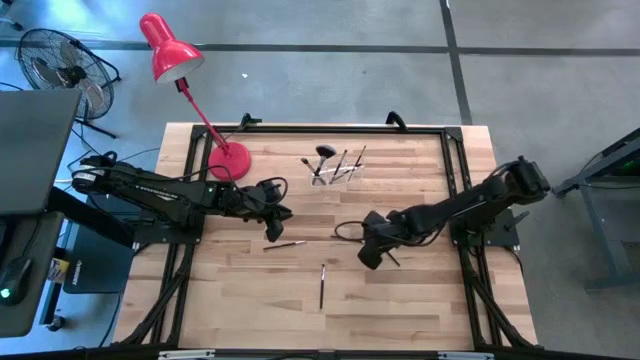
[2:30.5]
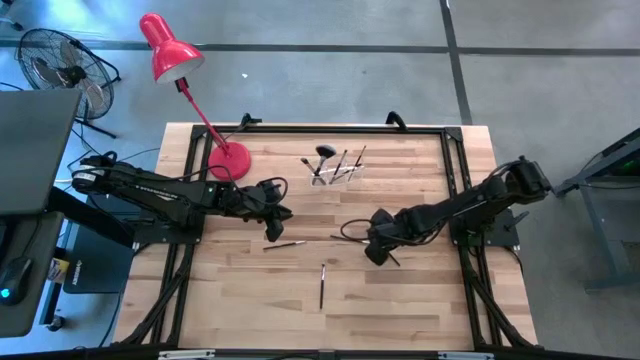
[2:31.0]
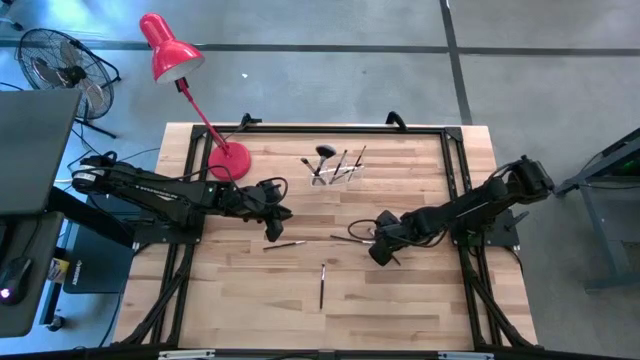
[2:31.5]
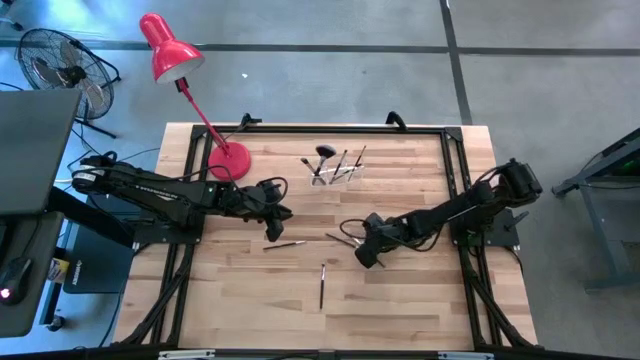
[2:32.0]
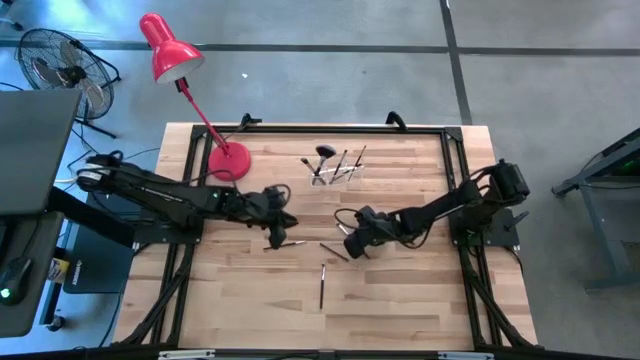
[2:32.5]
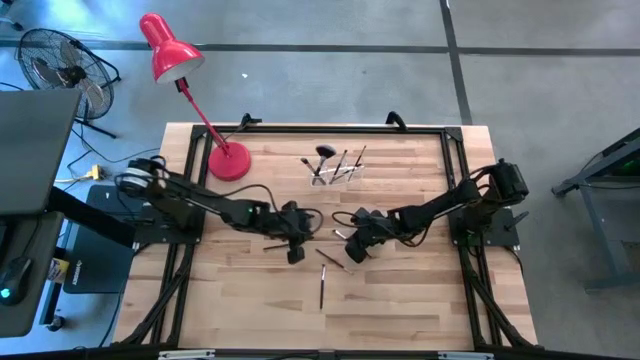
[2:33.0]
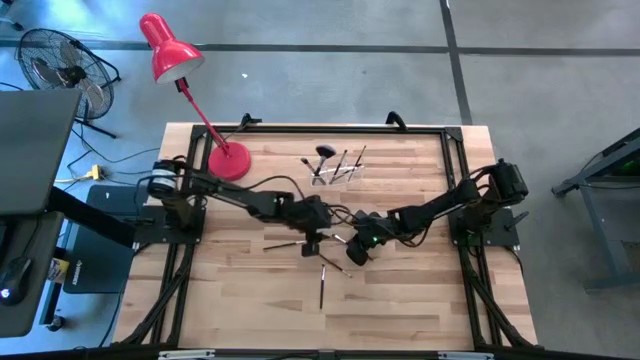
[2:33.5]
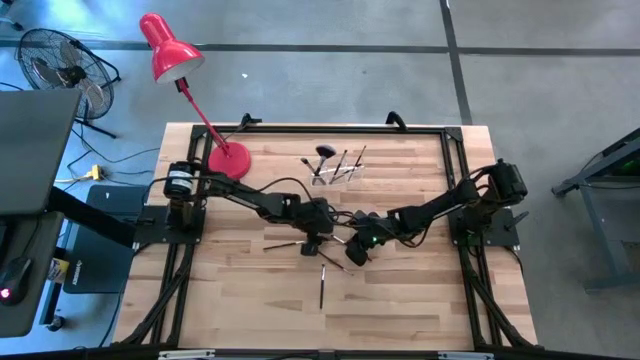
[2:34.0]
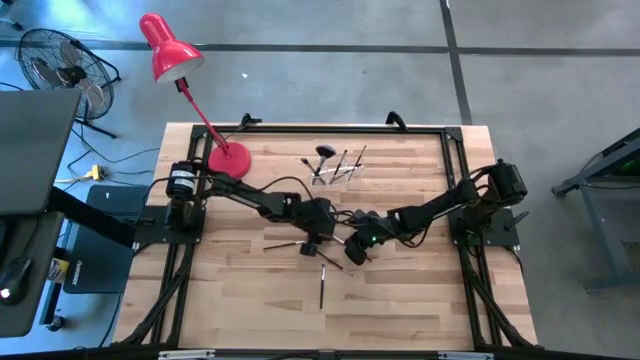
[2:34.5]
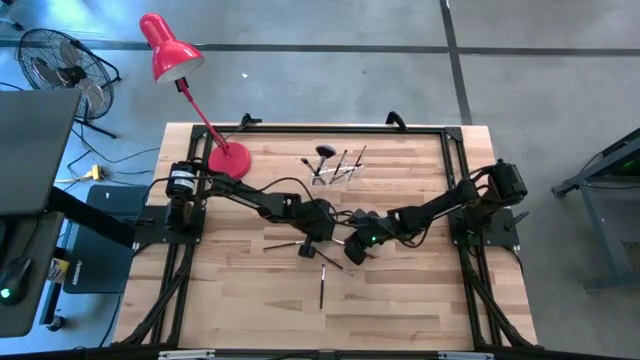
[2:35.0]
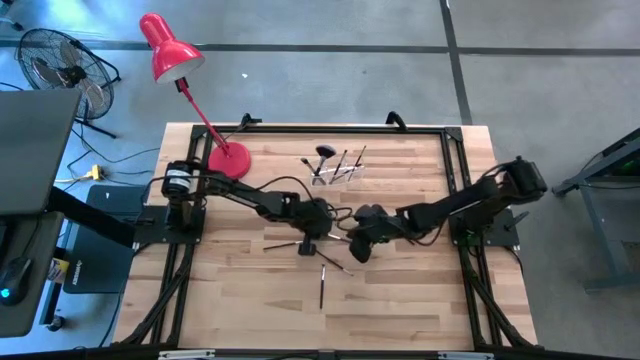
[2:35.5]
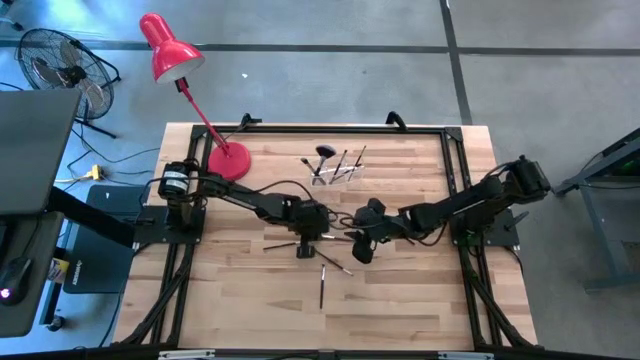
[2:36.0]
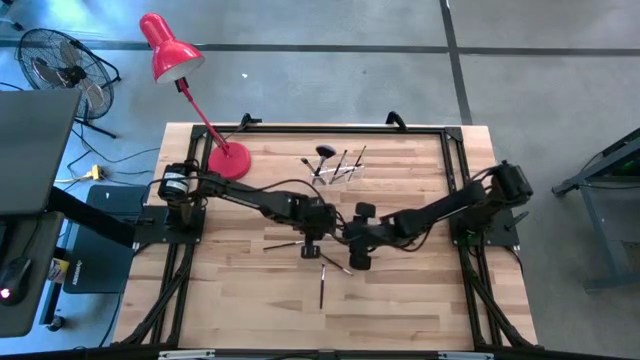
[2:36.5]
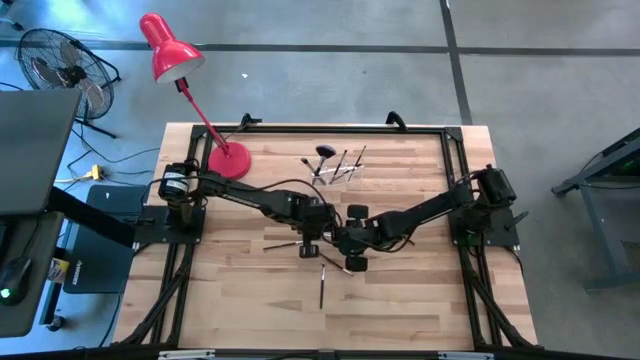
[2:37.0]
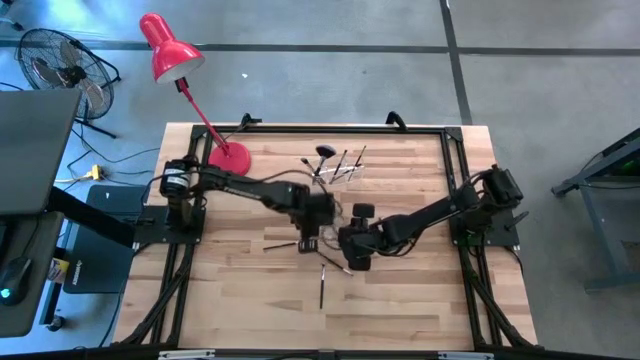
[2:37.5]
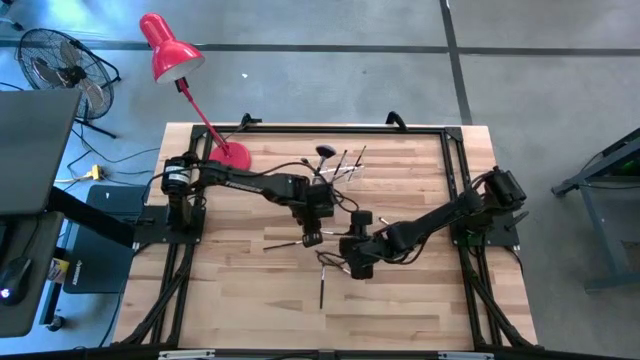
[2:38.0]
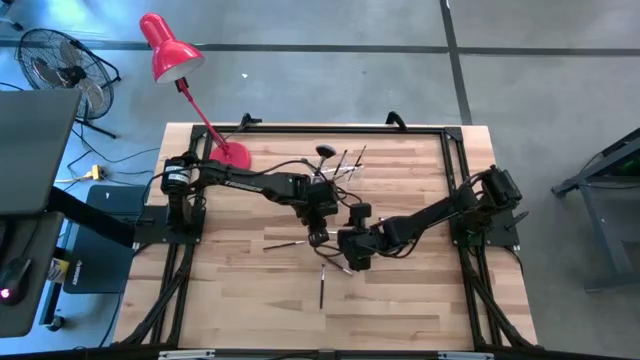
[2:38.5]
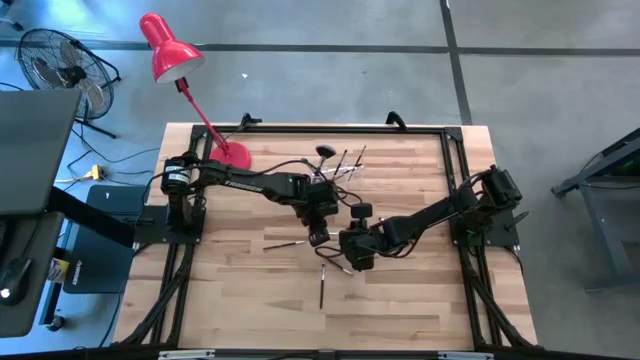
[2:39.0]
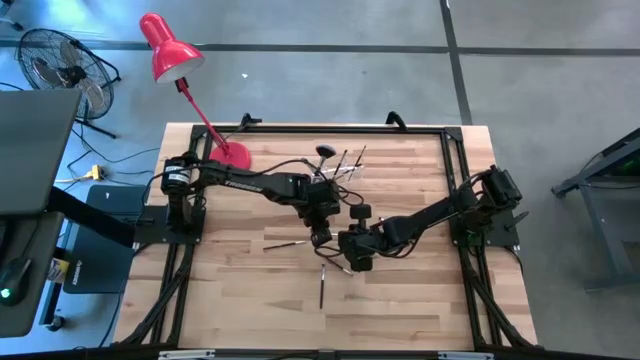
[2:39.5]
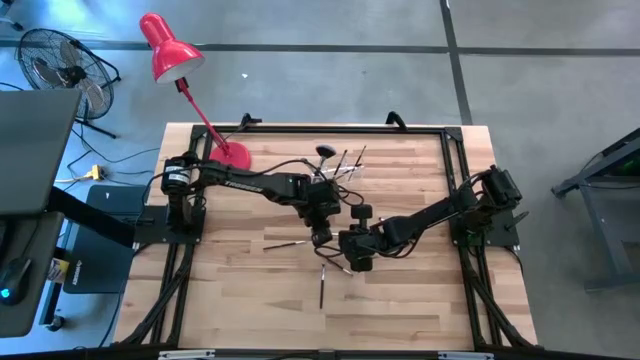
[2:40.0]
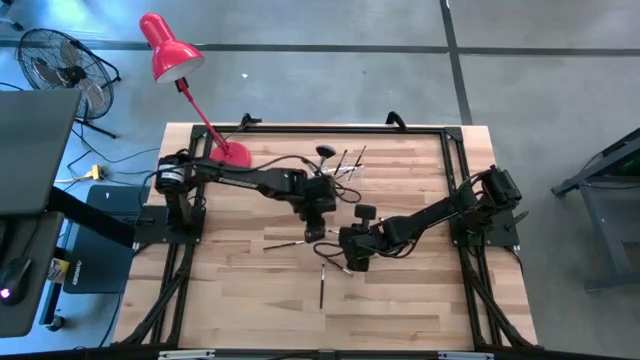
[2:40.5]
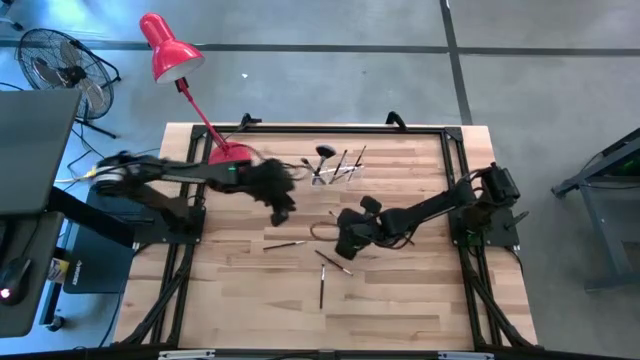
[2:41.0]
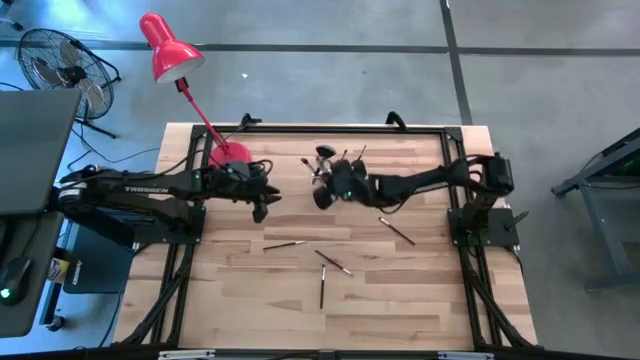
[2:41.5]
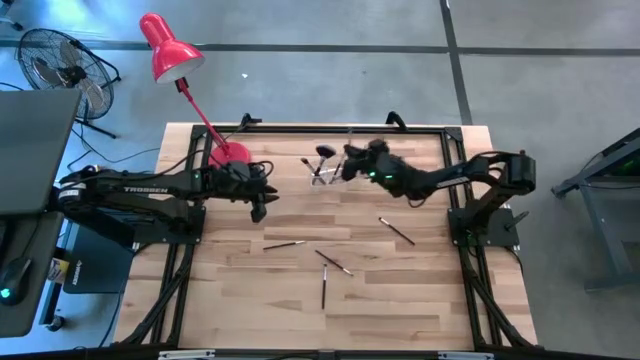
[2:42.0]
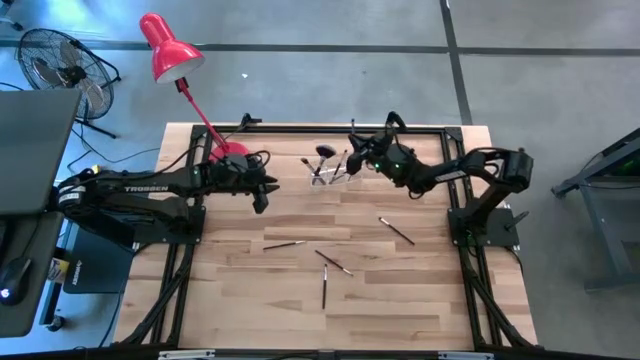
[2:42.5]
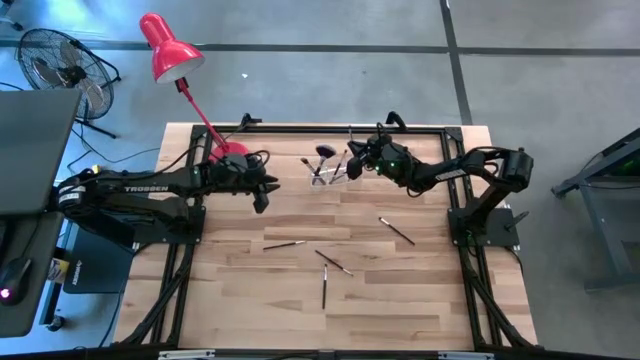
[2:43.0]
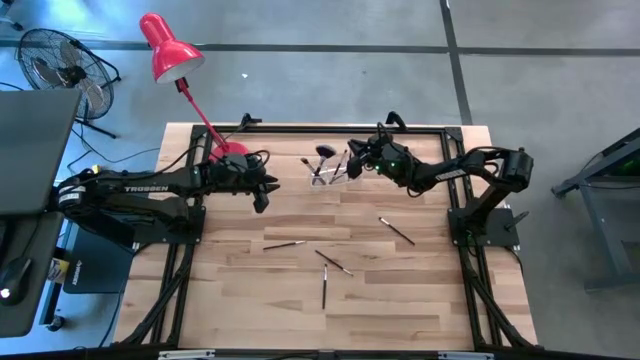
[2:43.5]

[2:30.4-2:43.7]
Task: Put items in baskets/containers
Put the eyeshadow brush into the transparent organizer

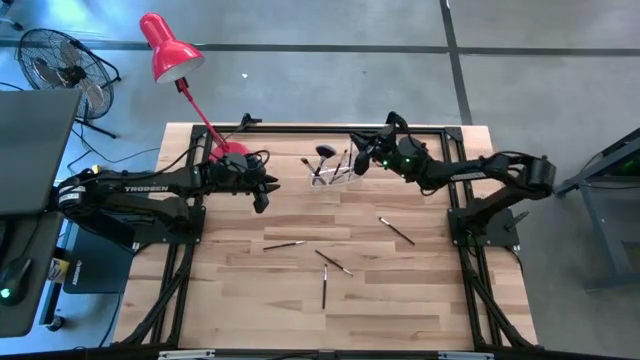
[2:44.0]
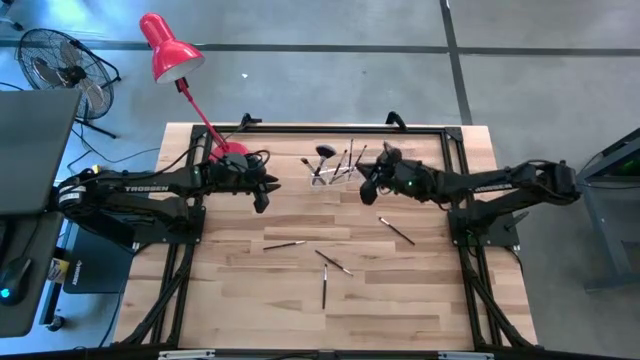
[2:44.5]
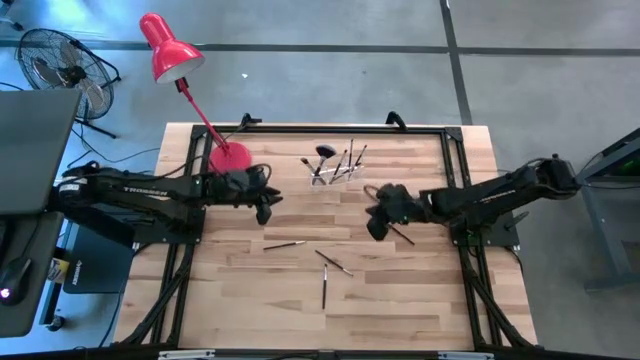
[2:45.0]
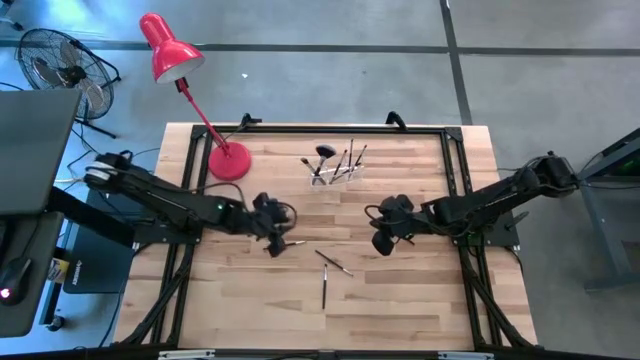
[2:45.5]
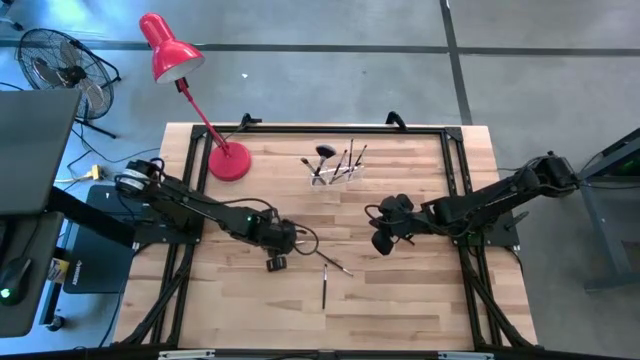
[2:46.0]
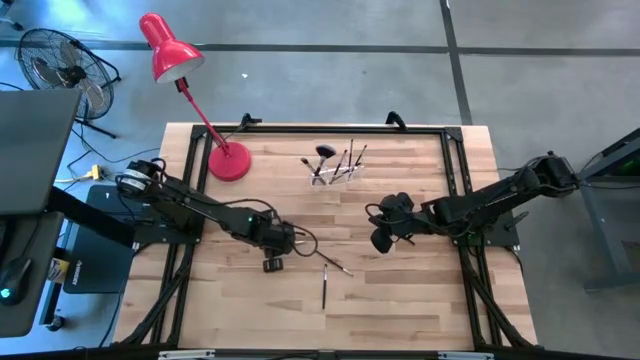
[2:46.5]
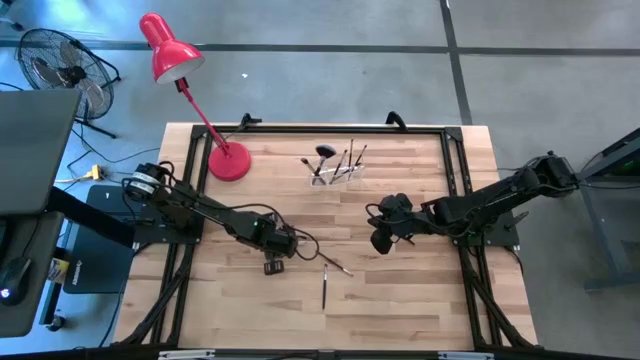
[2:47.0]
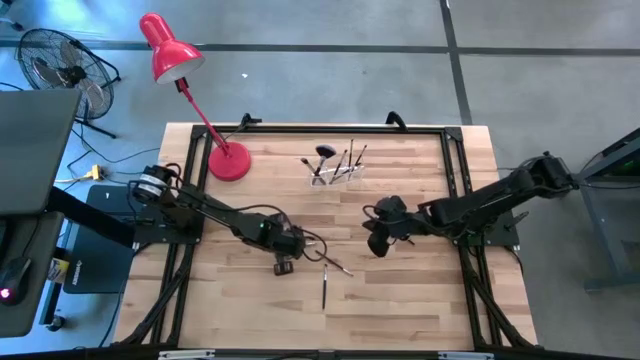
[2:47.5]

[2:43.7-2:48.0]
Put the liner brush into the transparent organizer

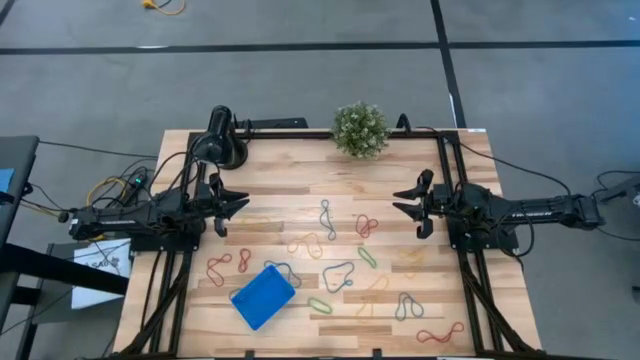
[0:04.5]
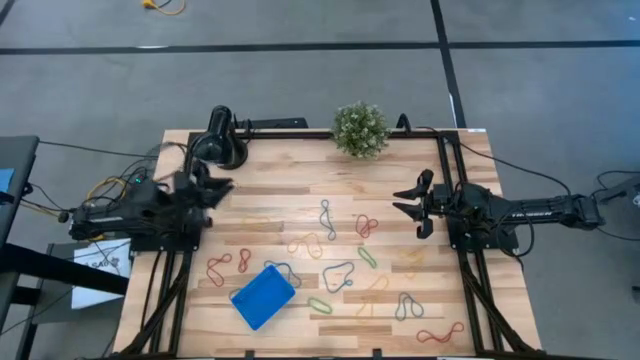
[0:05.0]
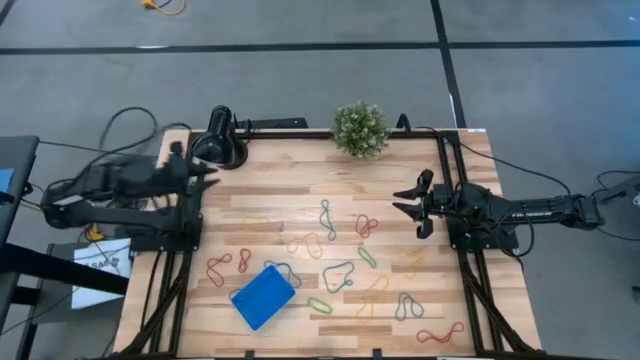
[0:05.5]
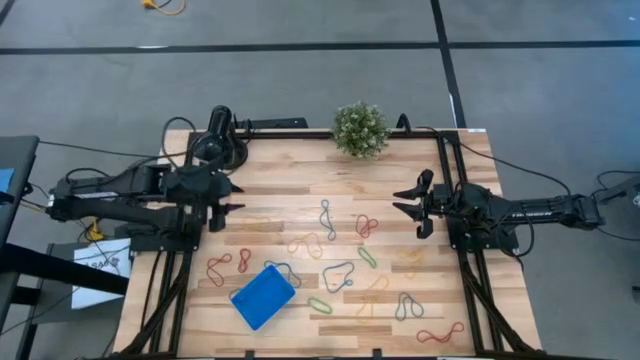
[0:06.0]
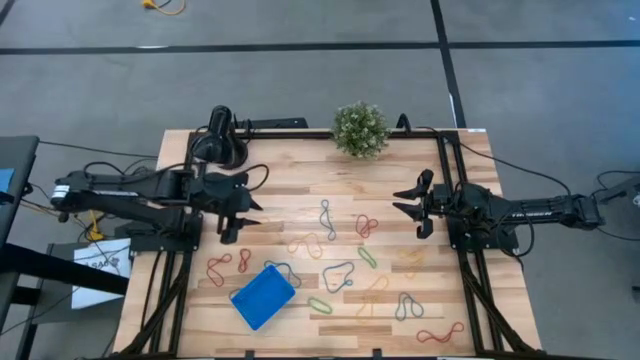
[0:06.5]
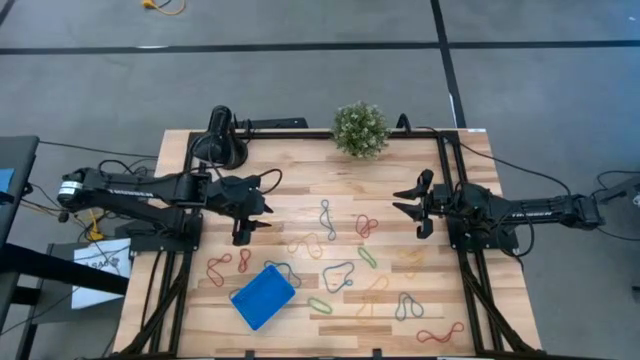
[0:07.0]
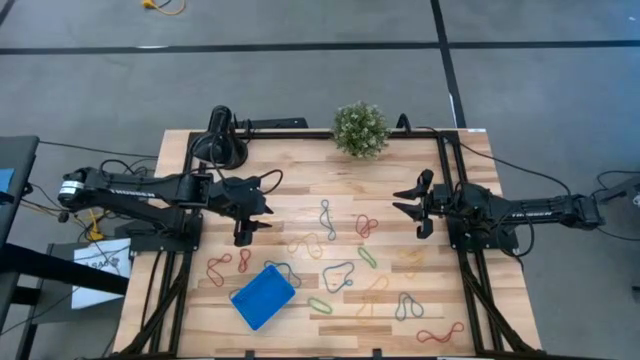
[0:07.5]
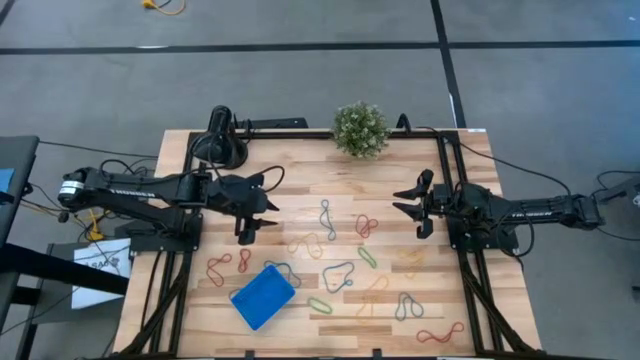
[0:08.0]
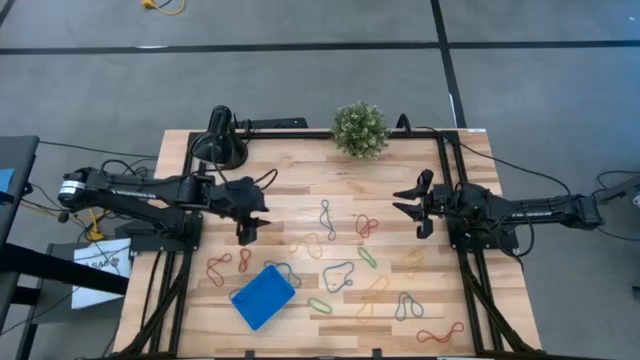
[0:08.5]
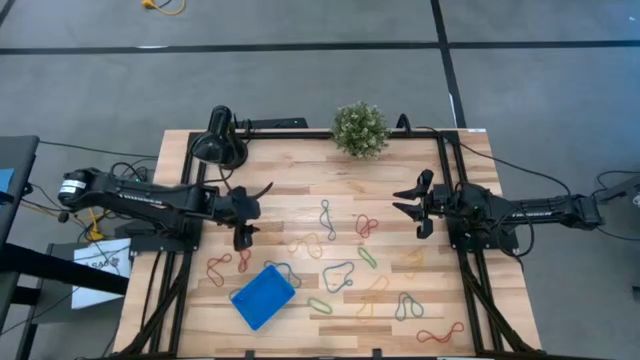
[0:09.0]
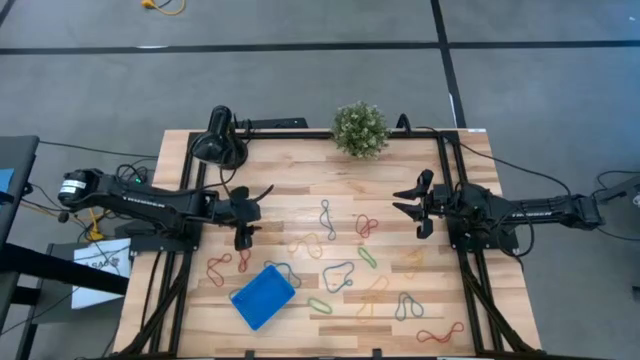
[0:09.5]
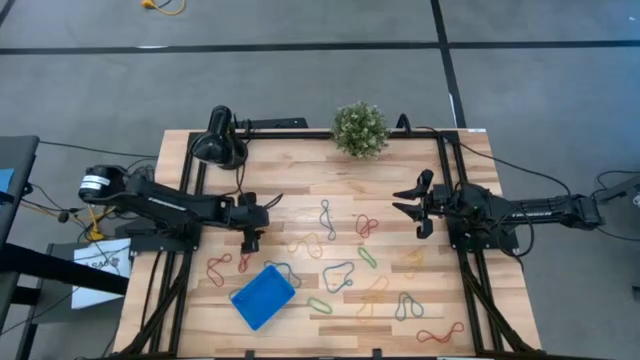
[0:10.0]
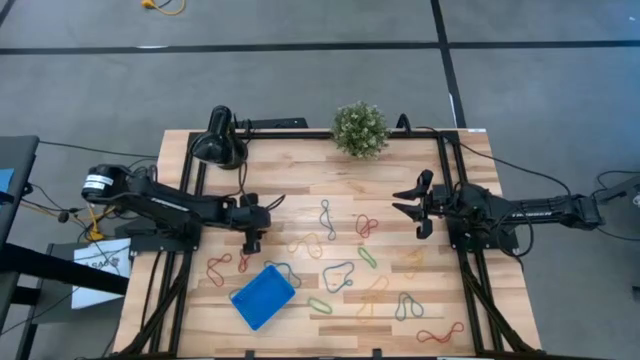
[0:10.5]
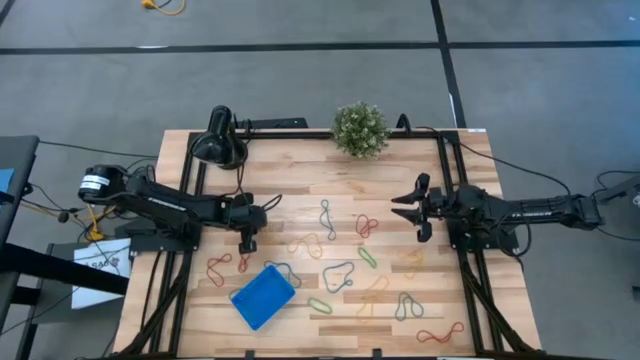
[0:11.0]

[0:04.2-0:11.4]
Task: Pick and place rubber bands into bin
Put the yellow rubber band into the blue basket
